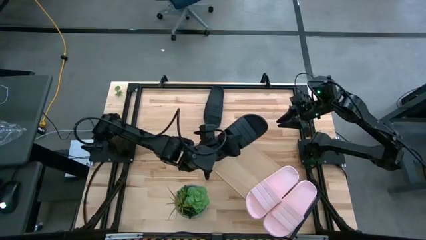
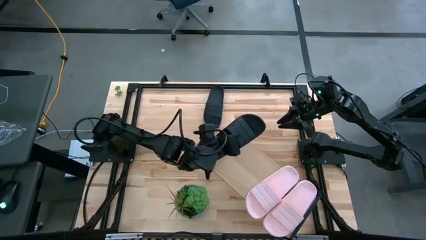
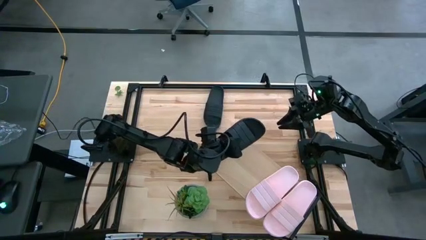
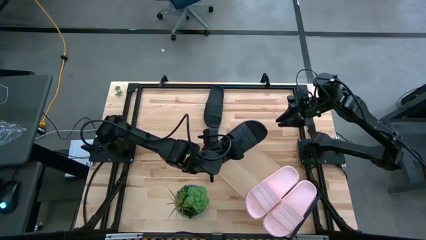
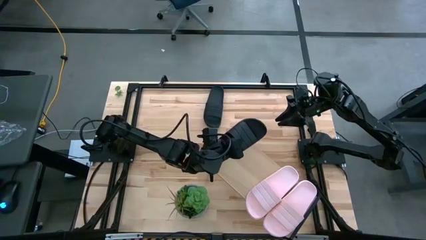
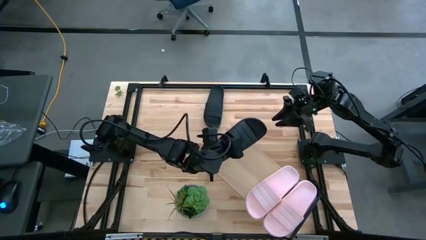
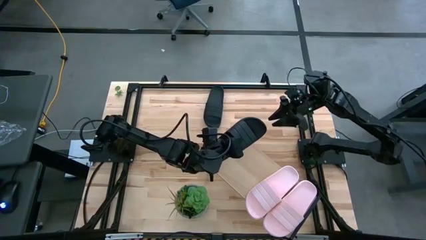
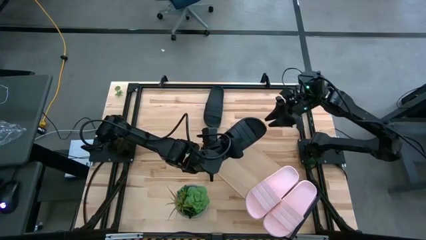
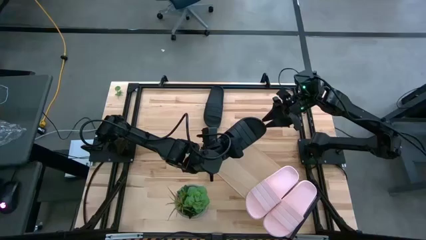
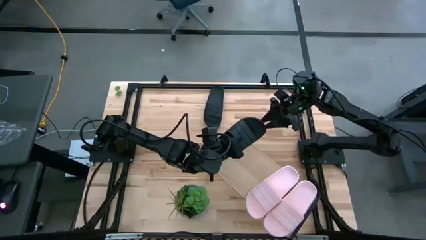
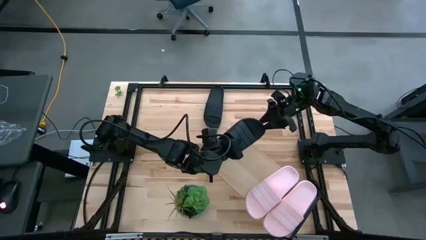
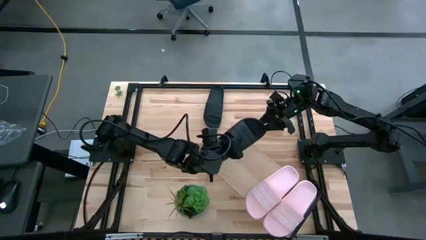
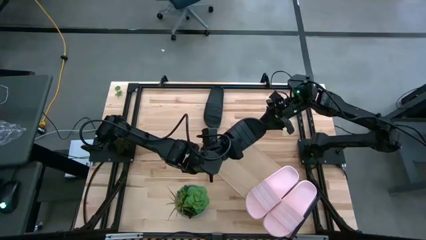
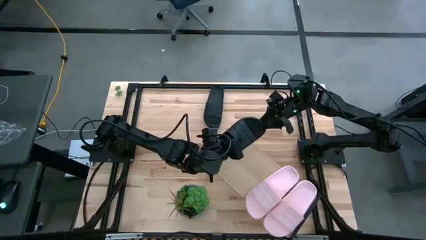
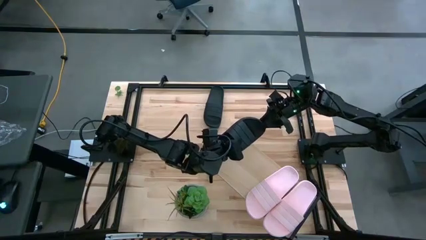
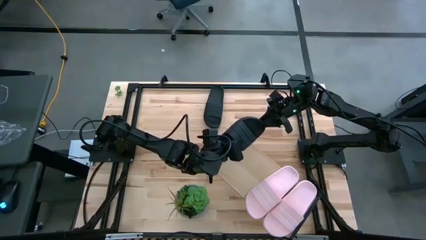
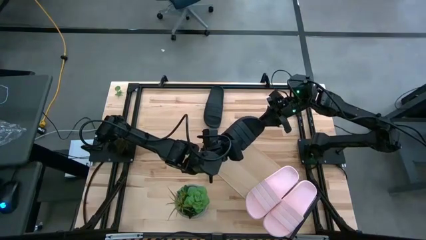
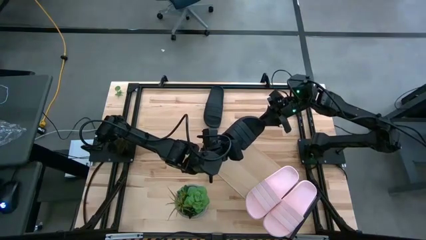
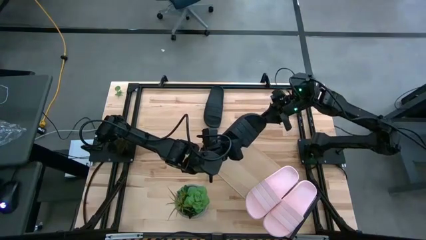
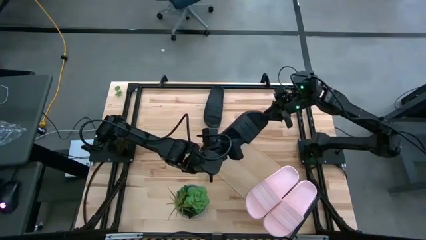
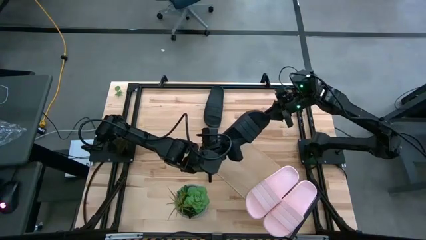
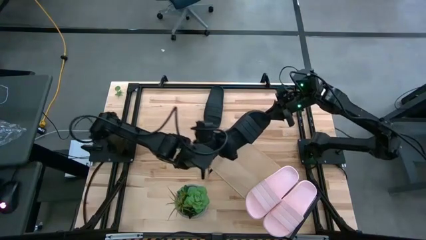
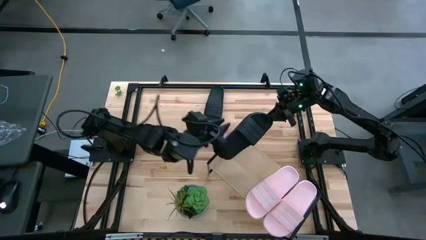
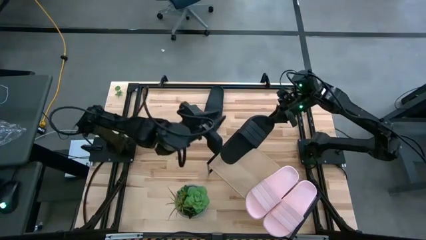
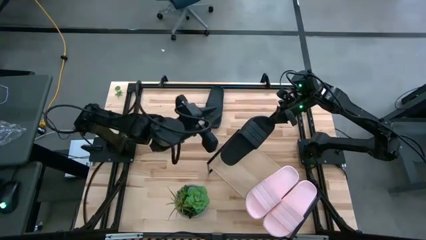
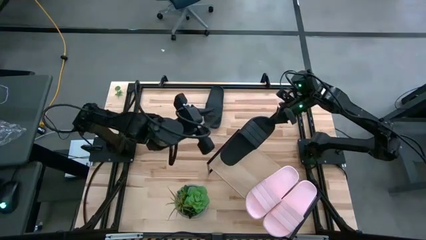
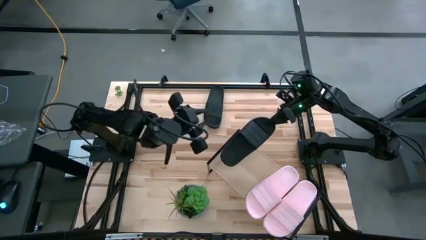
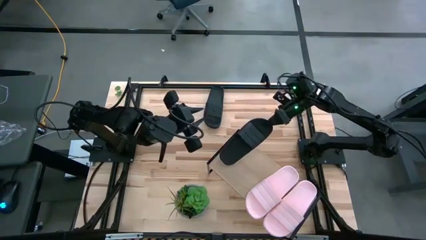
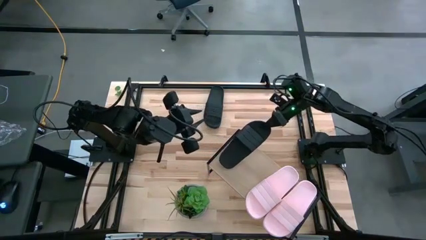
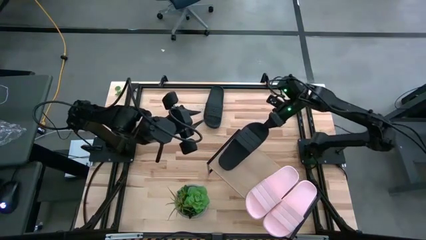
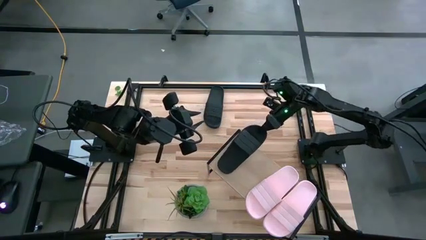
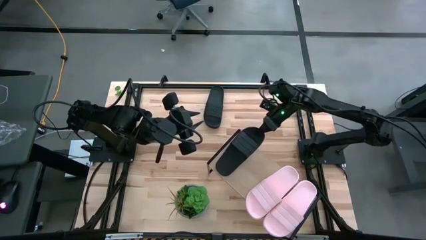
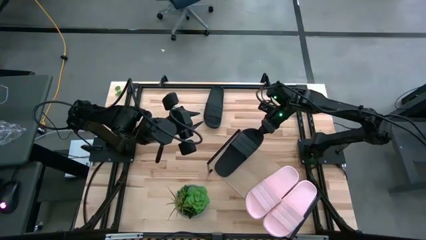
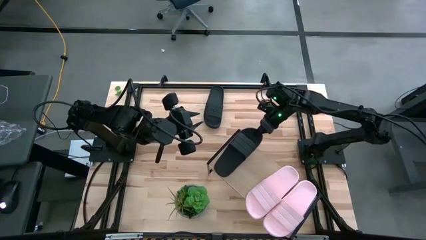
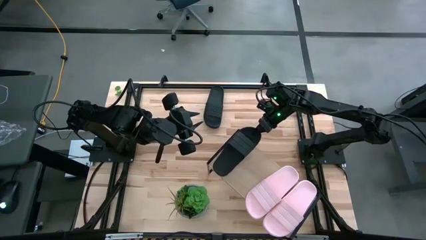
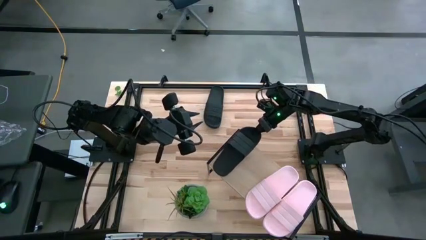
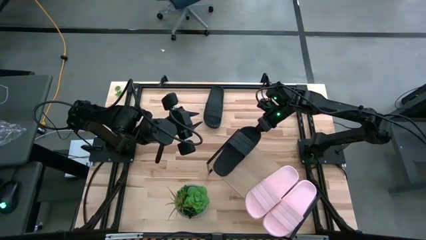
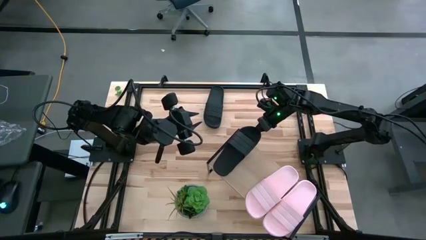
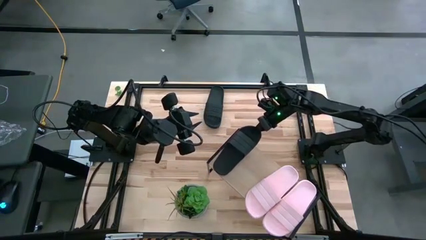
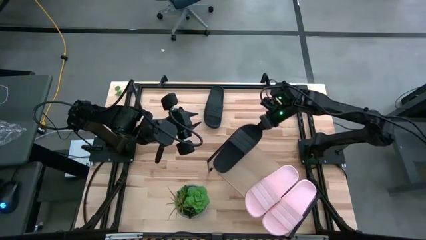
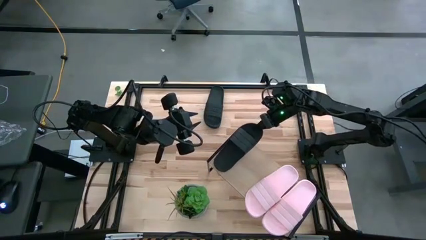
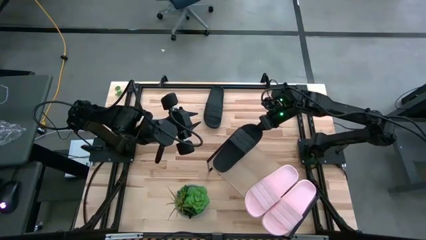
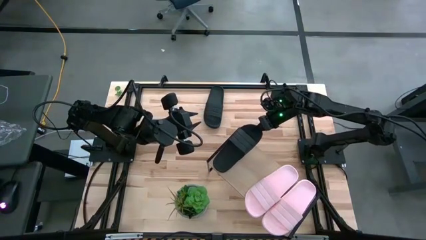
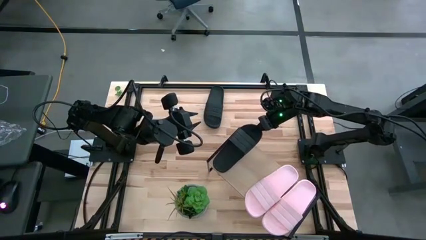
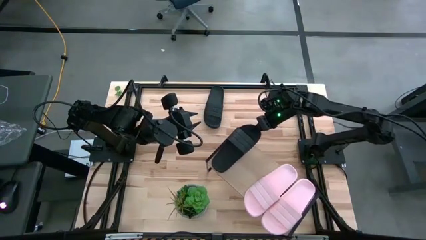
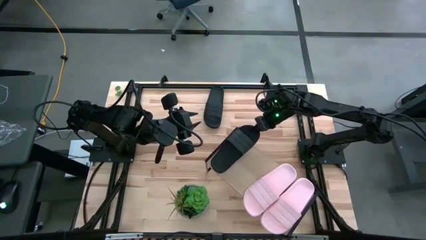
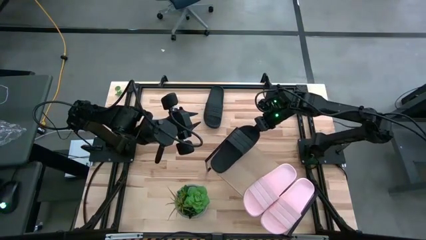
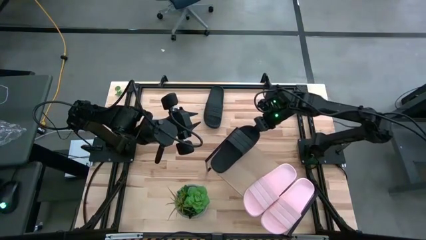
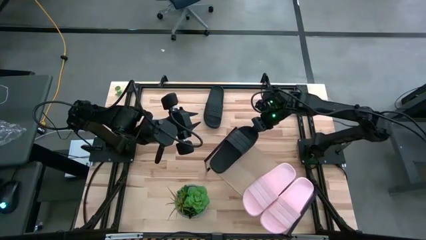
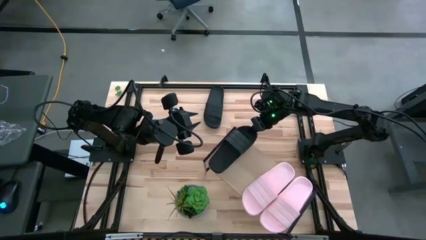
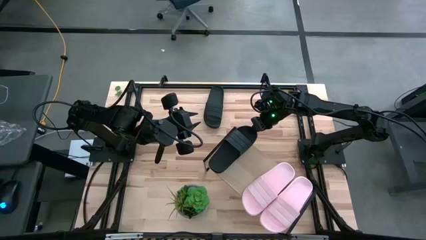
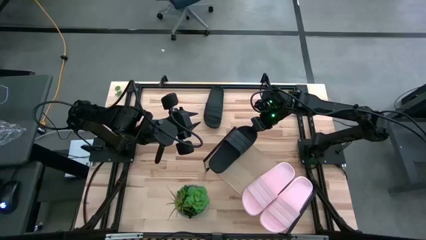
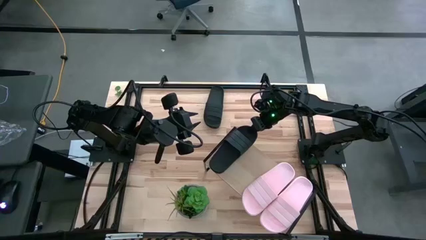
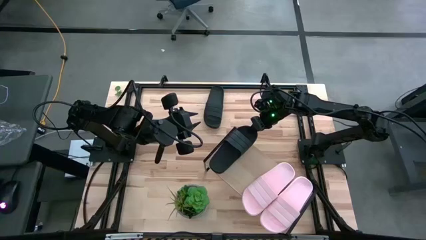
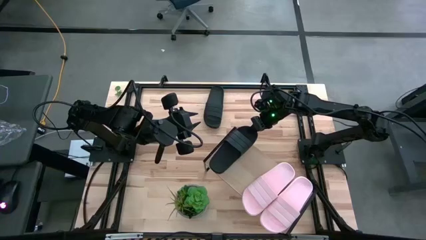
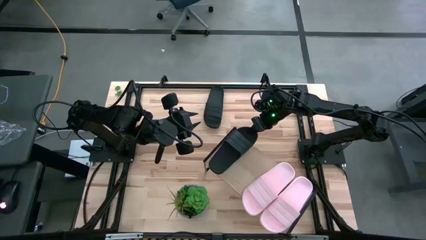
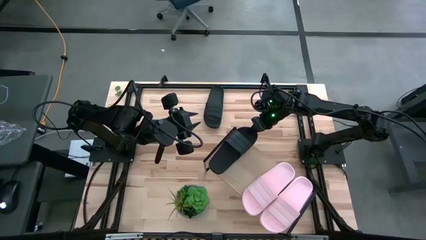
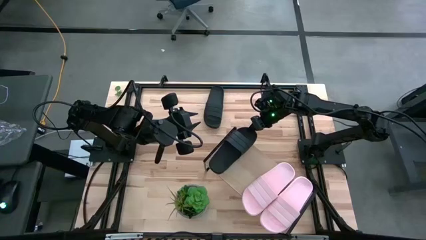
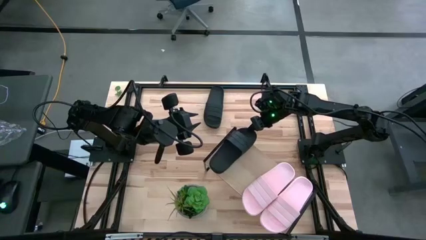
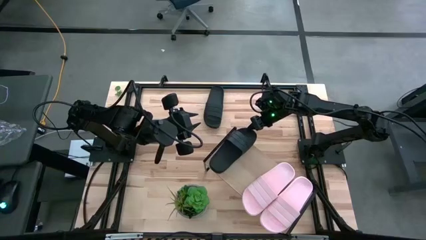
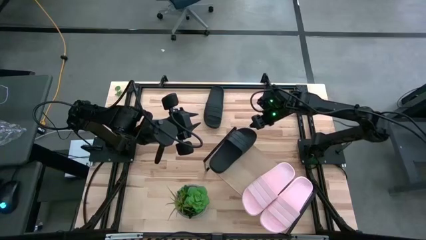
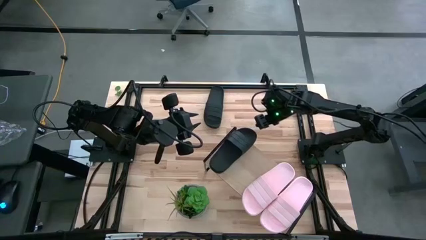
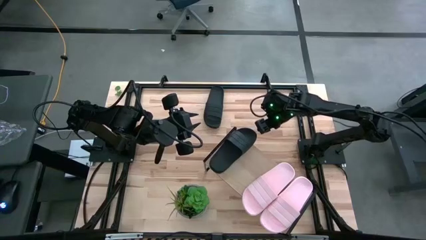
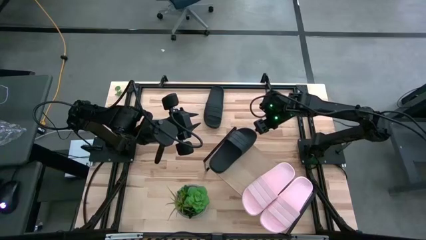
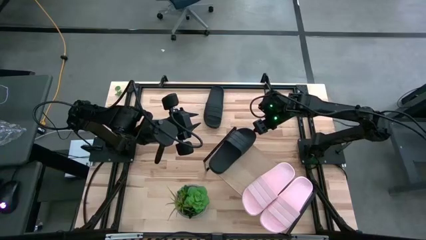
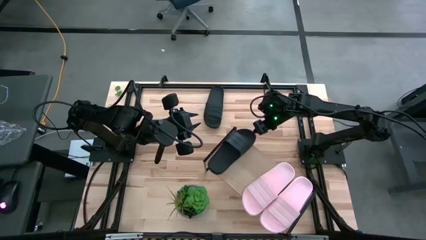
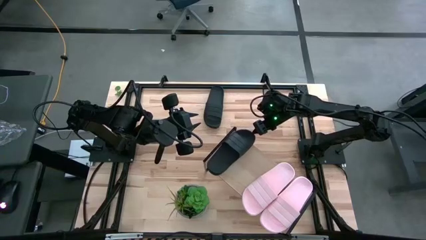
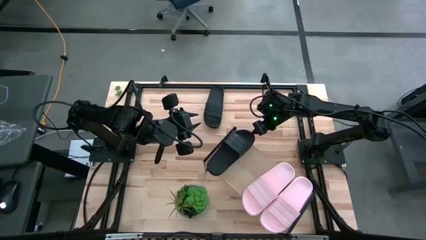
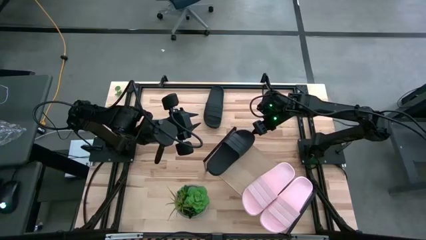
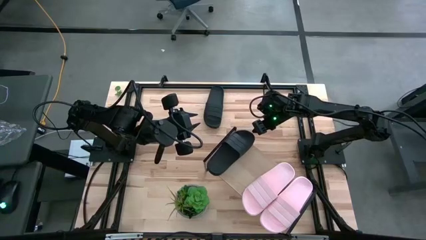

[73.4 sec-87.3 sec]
Task: Pick and place slides into the shelf
Put the left black slides on the shelf
